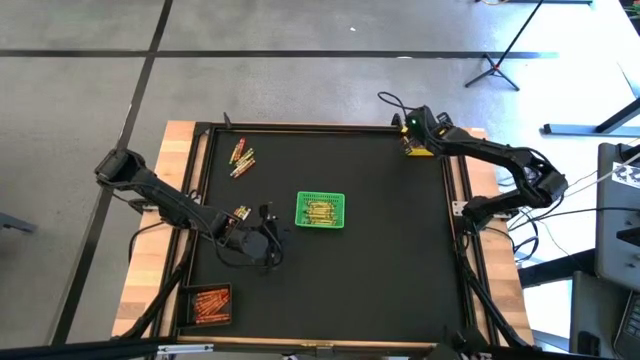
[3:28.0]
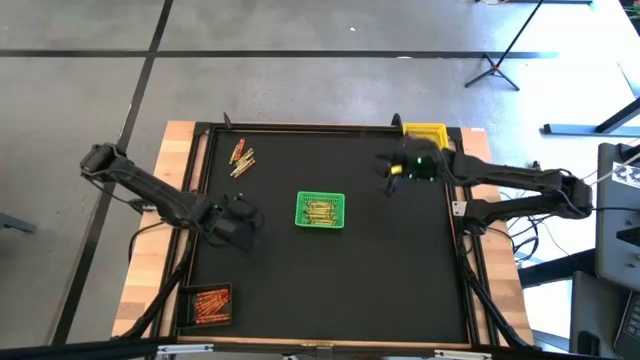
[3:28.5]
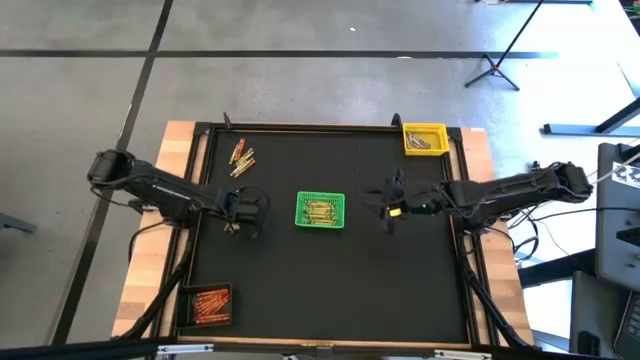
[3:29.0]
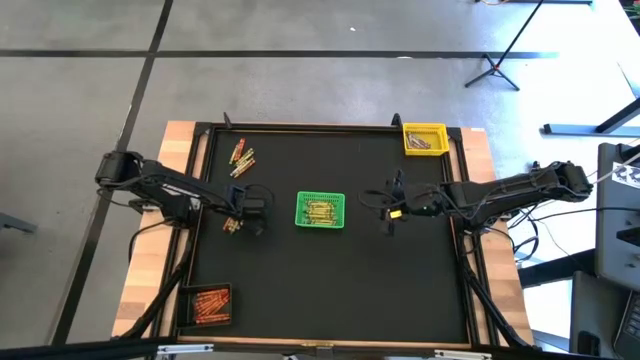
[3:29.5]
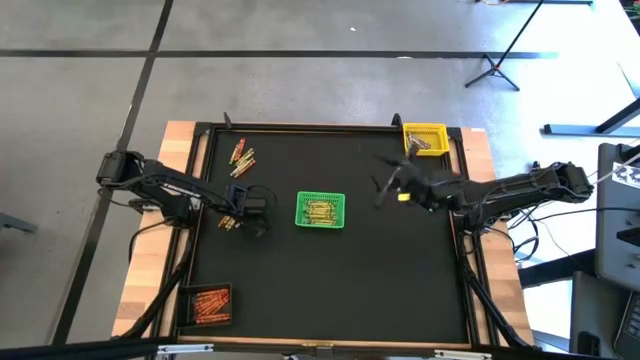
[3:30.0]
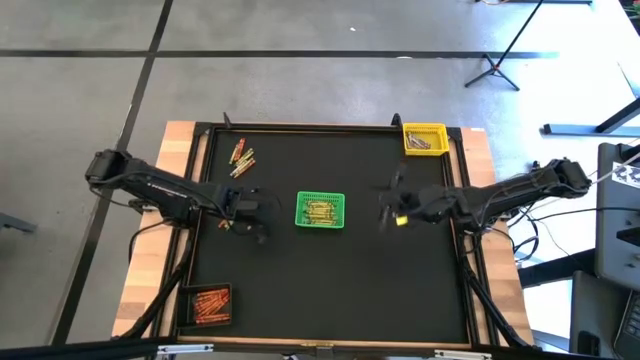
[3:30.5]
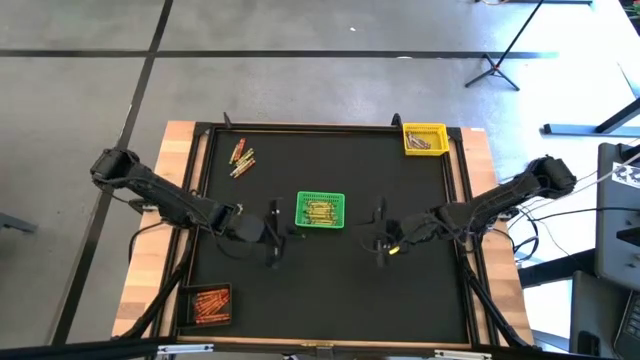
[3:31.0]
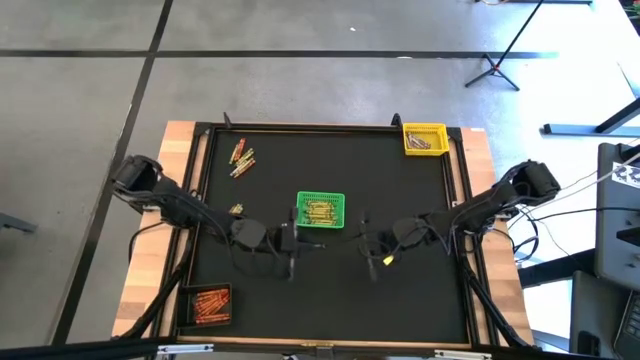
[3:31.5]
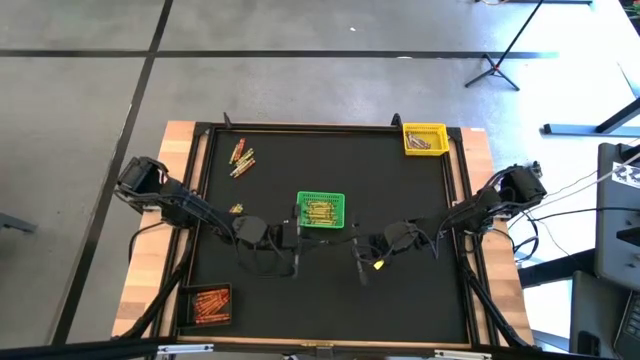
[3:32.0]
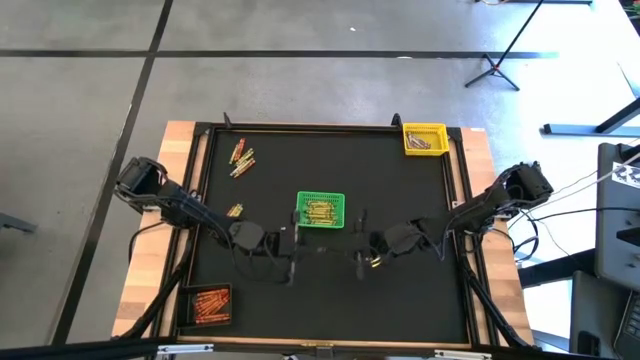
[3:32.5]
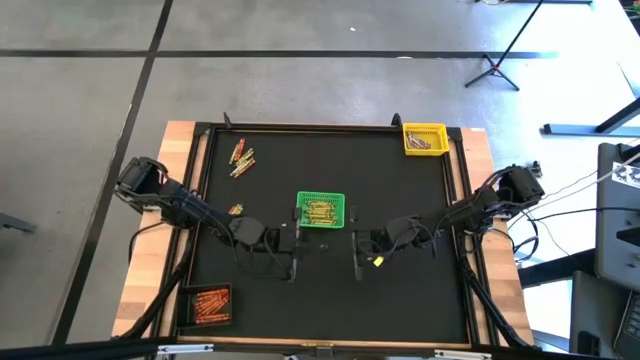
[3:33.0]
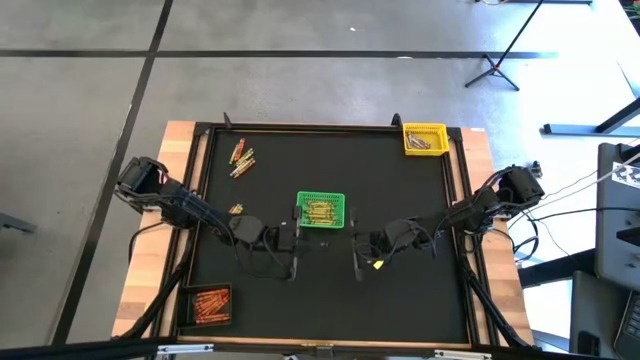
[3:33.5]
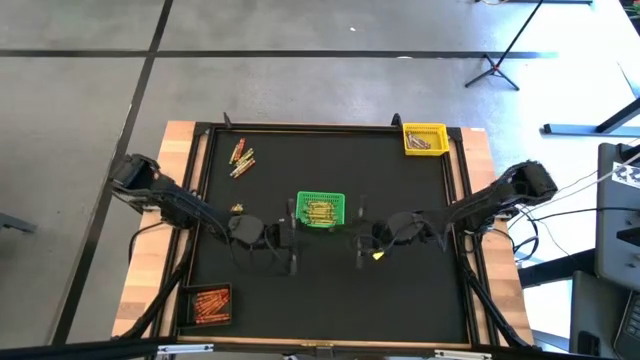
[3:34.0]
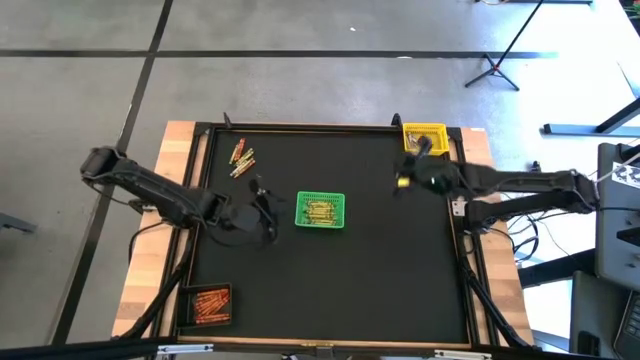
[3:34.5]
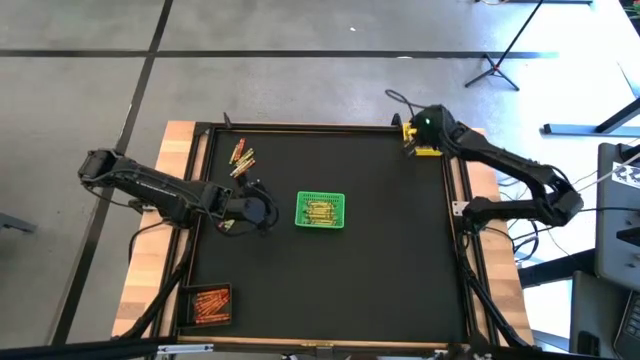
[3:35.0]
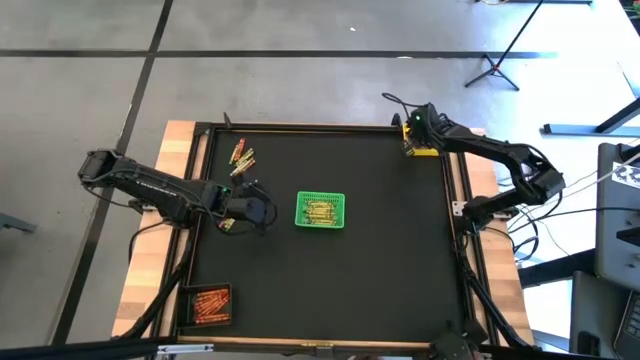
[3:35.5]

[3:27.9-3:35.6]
Task: Sort crayons
Put the black crayon into the yellow bin

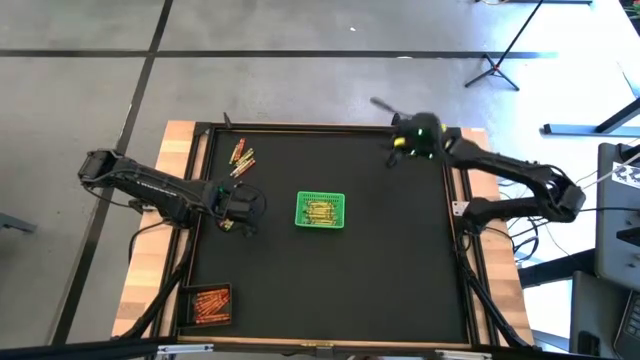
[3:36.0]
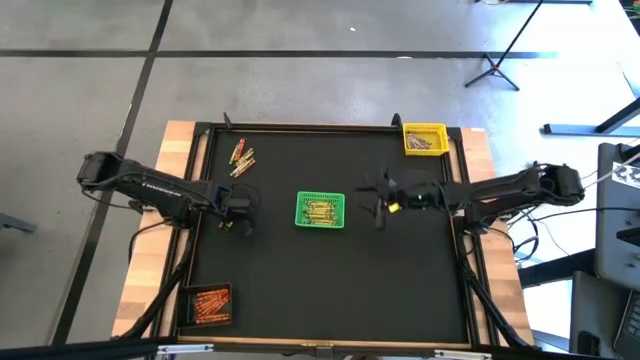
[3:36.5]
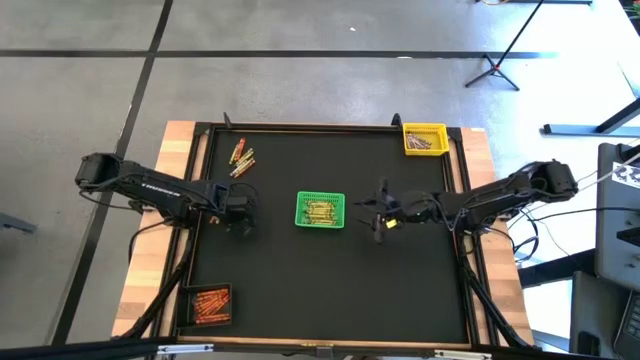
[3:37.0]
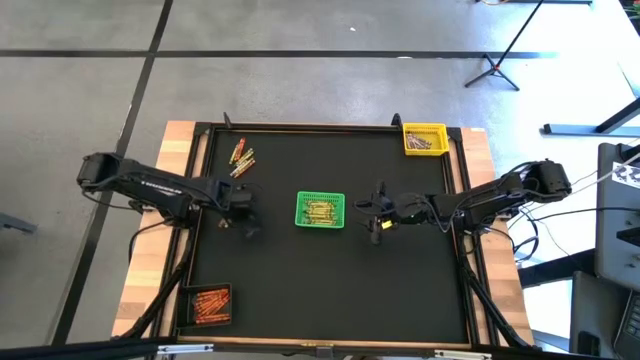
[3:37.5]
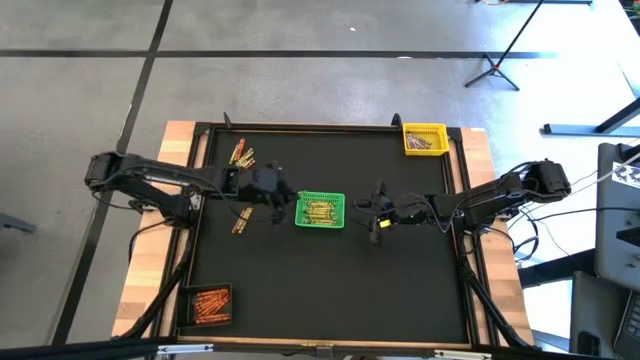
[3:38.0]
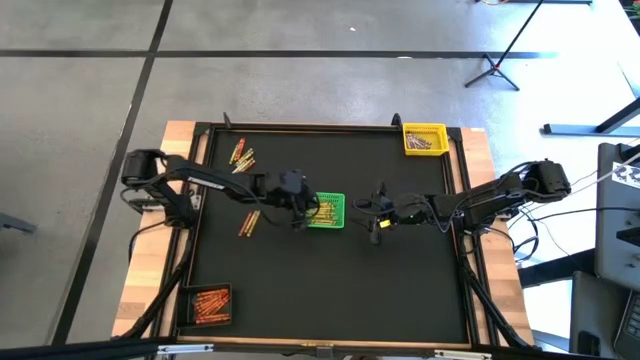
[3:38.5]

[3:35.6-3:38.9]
Put the green crayon into the green bin

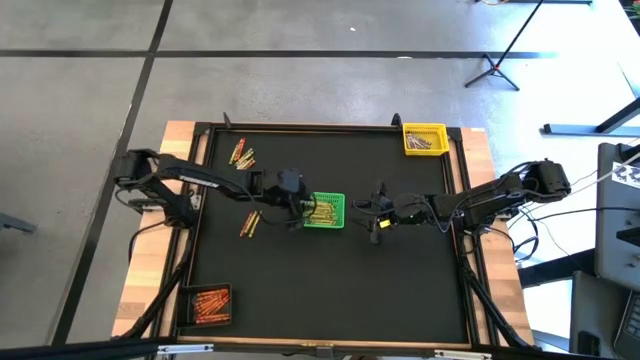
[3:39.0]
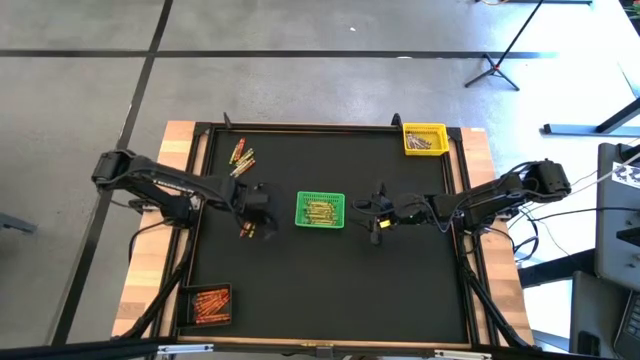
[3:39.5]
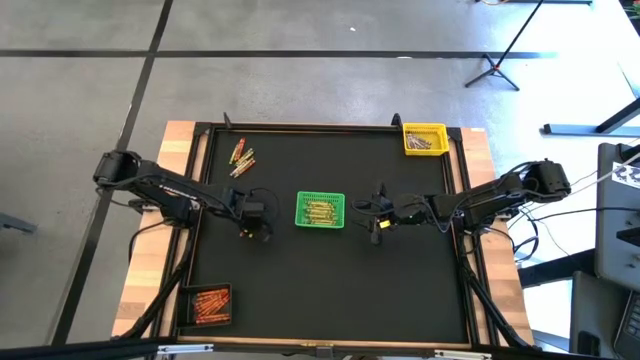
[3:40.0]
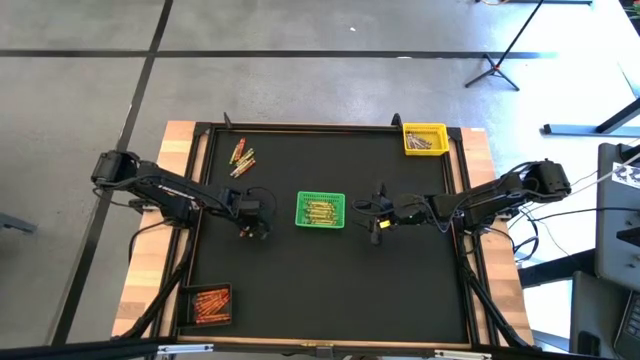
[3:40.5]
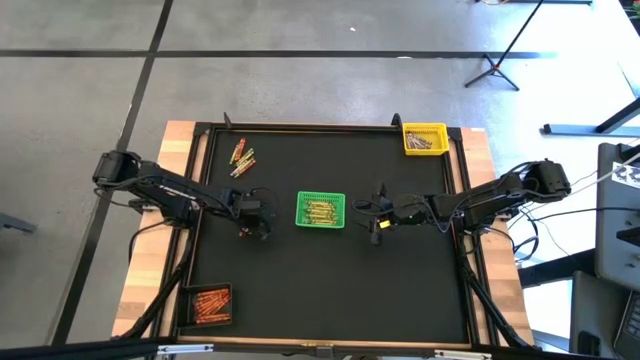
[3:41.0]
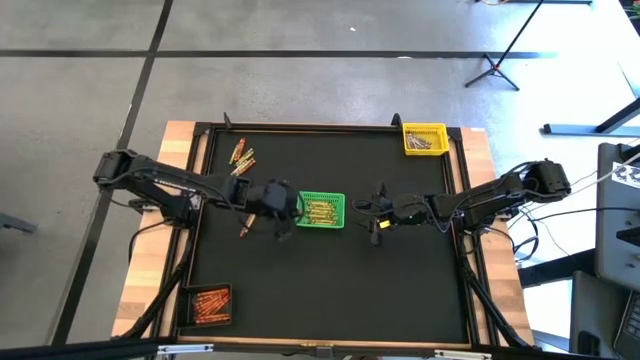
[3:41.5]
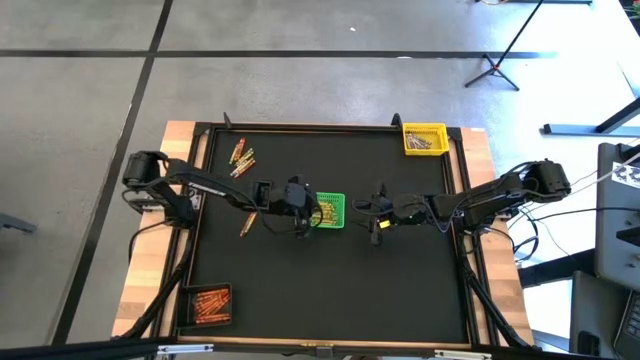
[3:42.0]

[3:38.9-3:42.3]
Put the green crayon into the green bin

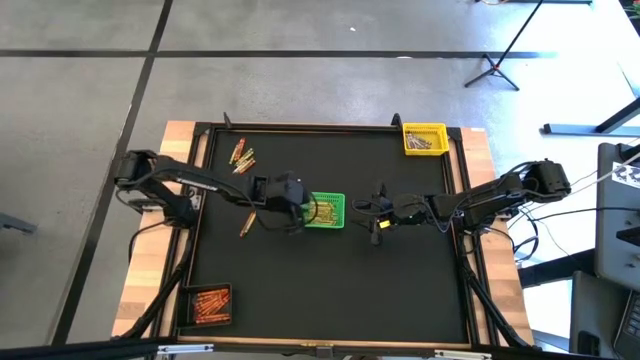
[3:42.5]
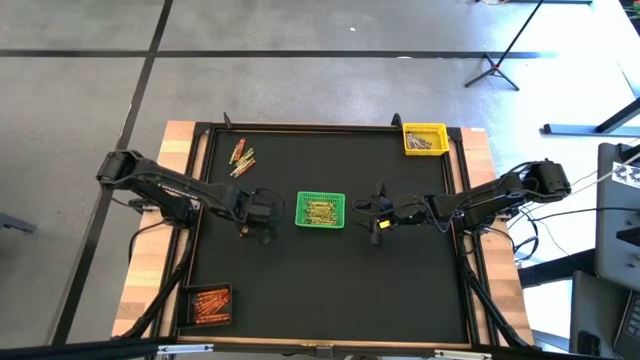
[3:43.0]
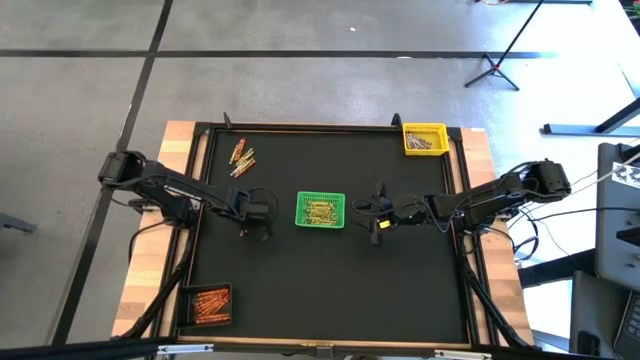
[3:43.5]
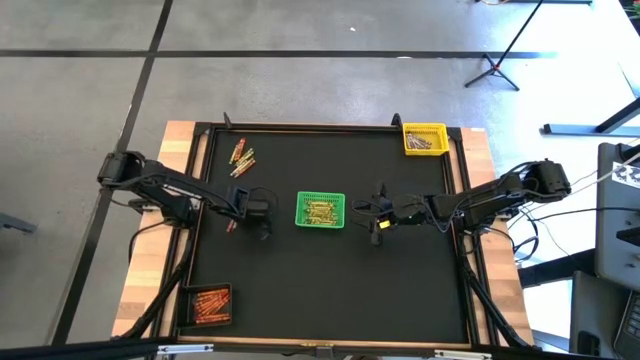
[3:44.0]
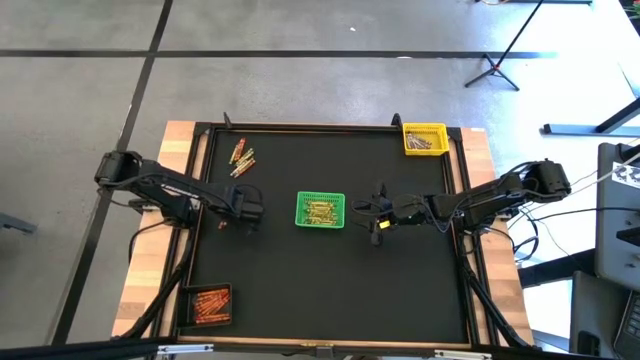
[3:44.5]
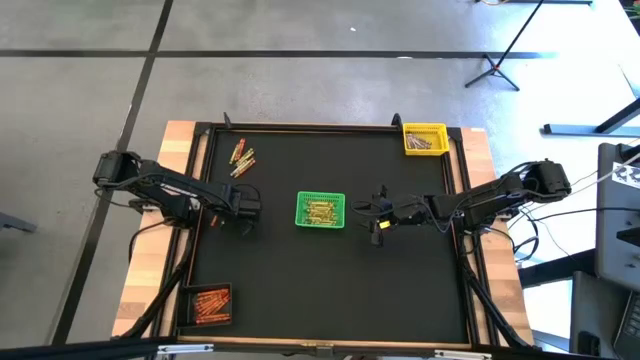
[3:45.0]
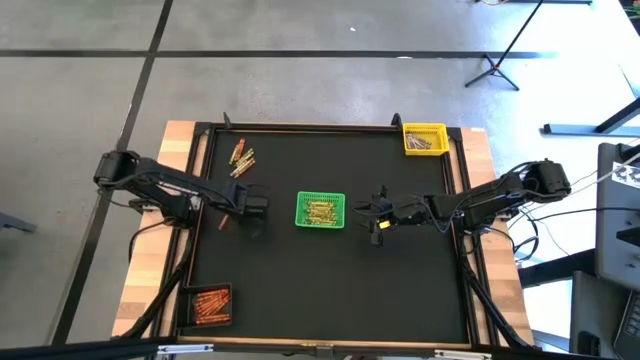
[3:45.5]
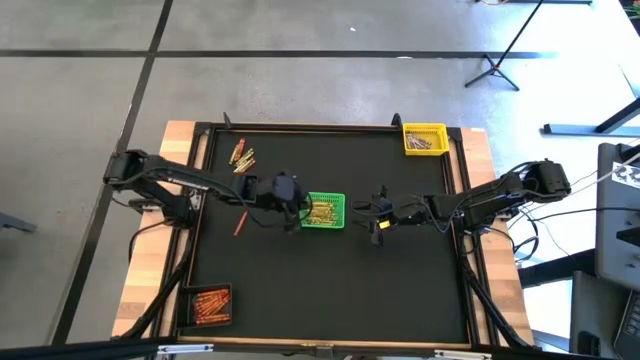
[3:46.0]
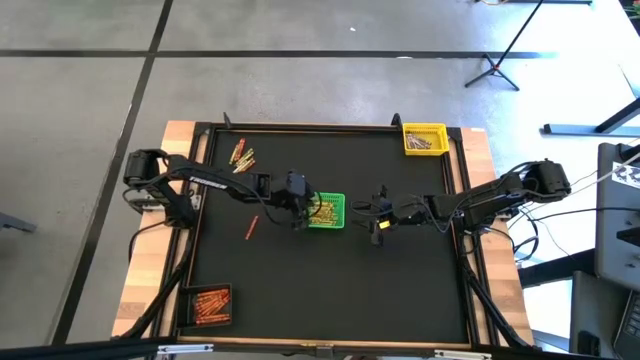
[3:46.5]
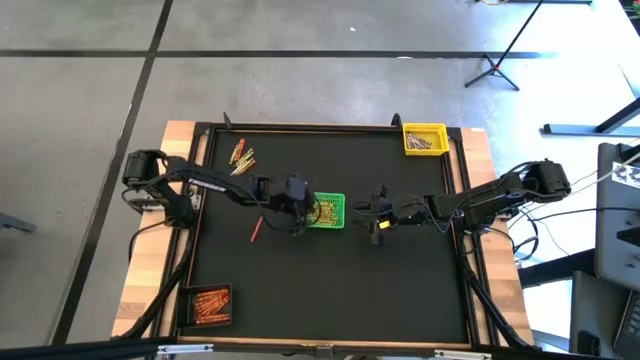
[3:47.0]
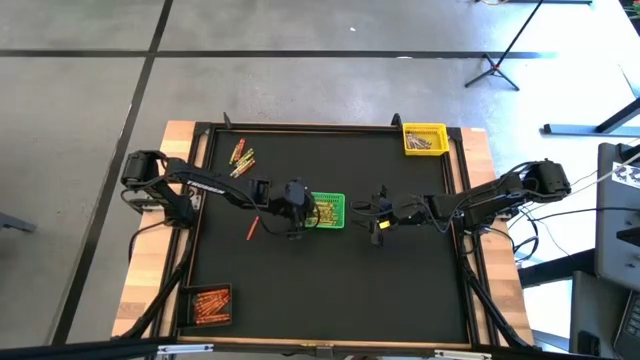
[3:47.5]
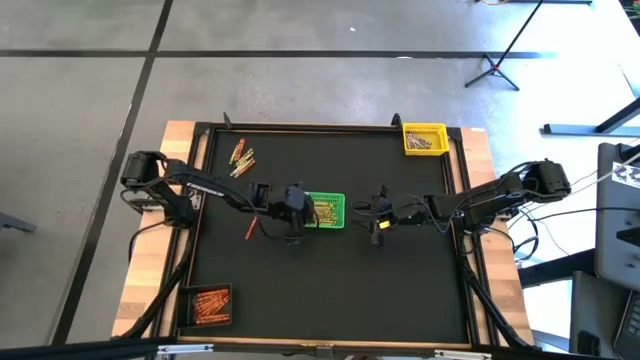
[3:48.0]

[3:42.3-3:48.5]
Put the green crayon into the green bin

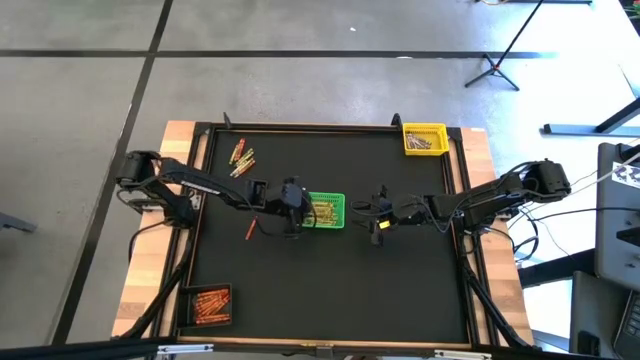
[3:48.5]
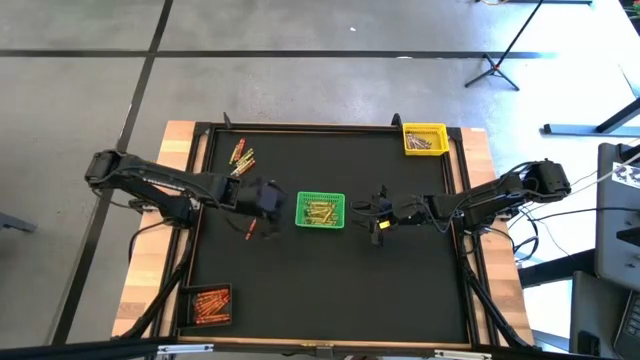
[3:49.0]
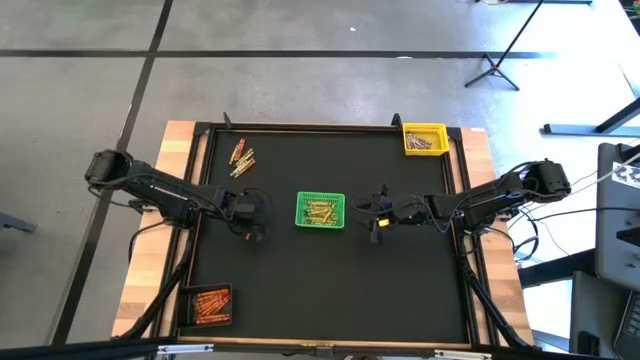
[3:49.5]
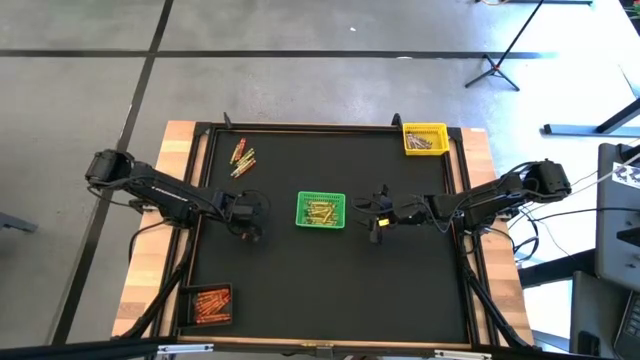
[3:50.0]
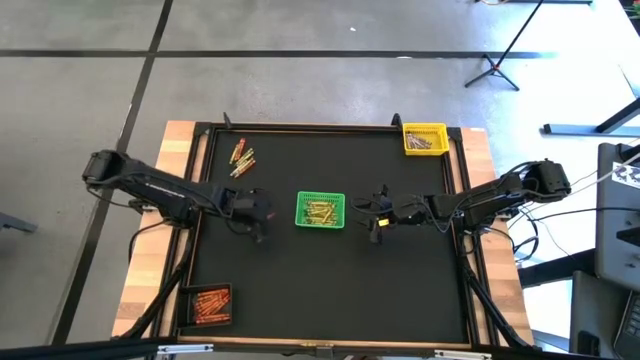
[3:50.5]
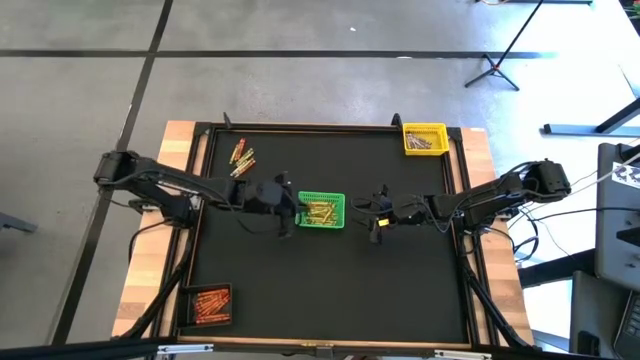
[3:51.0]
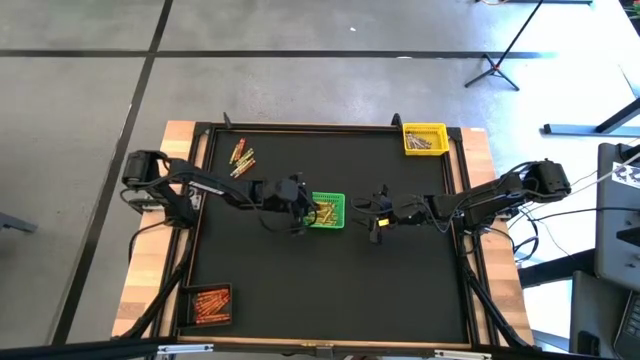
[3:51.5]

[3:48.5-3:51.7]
Put the orange crayon into the green bin
